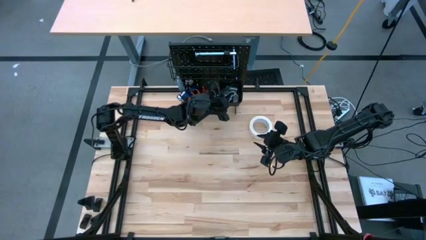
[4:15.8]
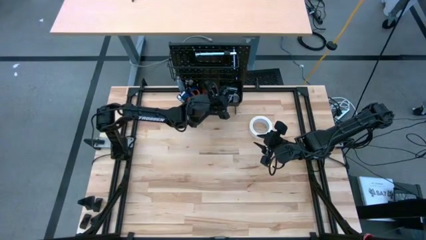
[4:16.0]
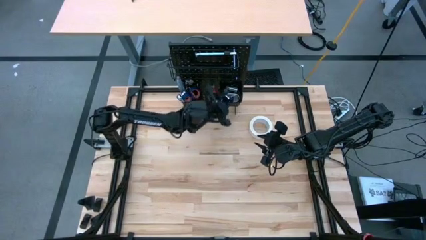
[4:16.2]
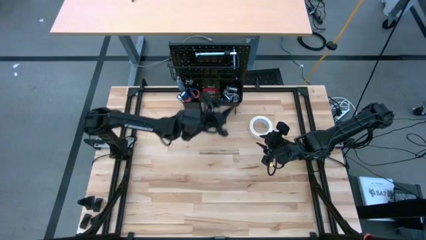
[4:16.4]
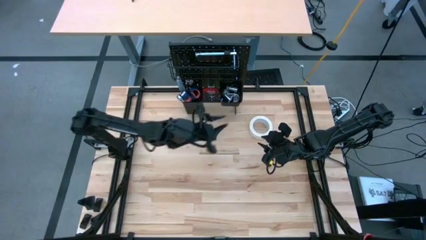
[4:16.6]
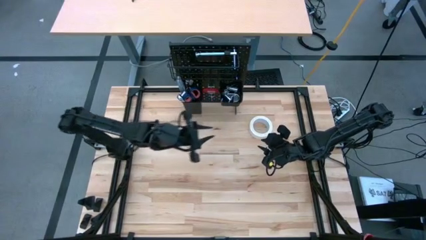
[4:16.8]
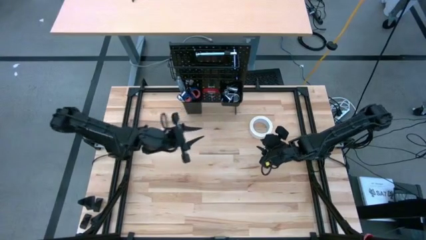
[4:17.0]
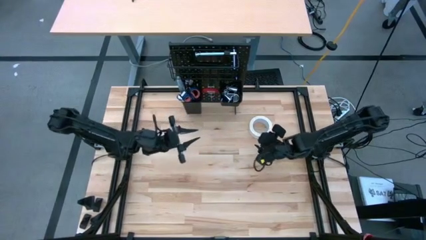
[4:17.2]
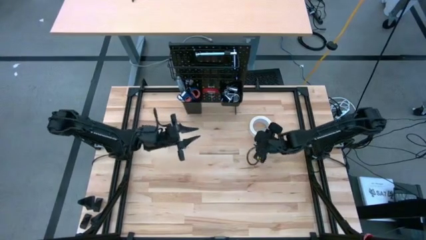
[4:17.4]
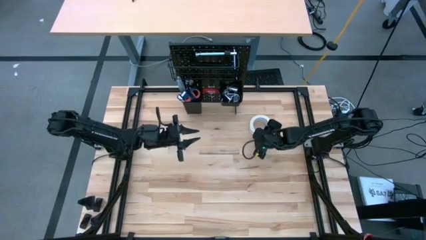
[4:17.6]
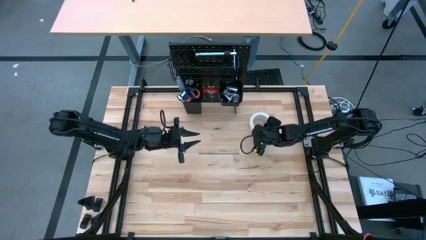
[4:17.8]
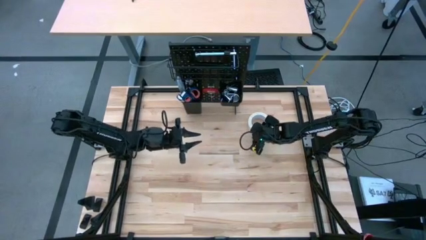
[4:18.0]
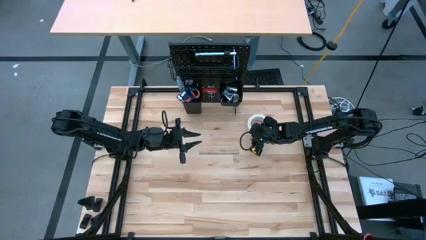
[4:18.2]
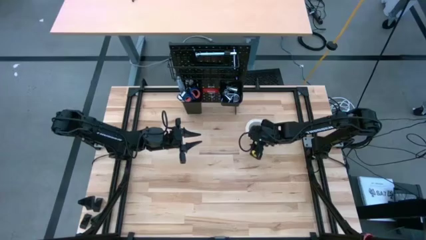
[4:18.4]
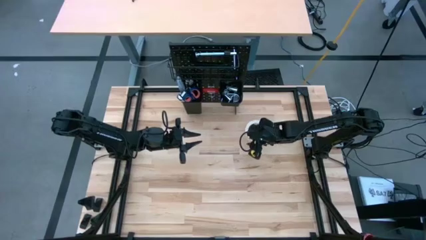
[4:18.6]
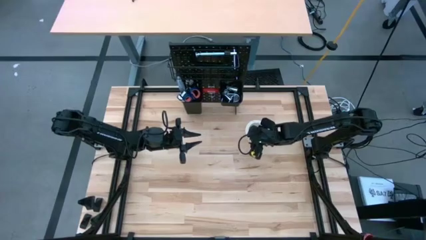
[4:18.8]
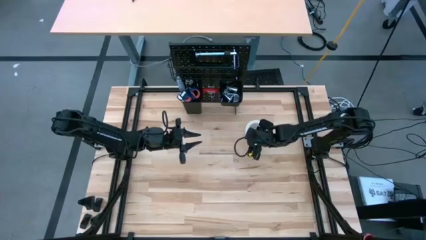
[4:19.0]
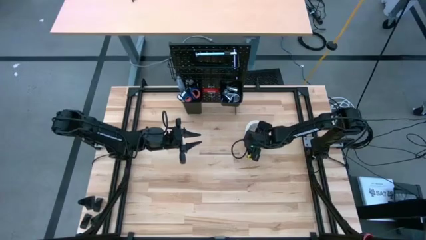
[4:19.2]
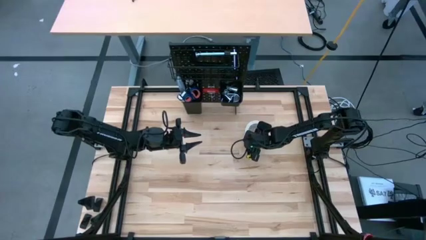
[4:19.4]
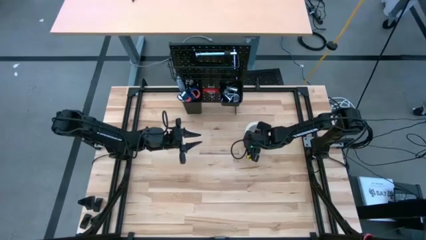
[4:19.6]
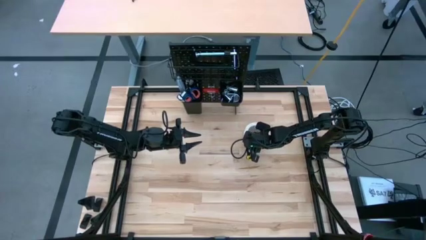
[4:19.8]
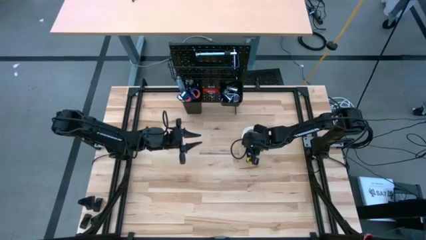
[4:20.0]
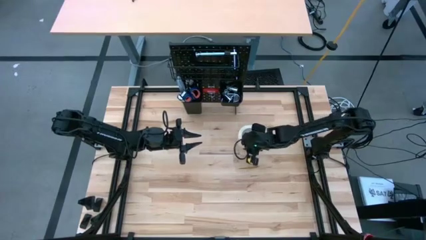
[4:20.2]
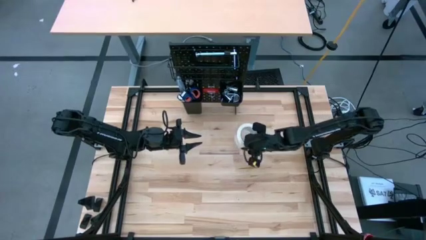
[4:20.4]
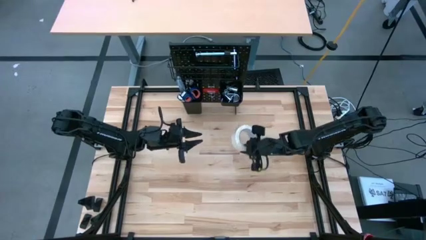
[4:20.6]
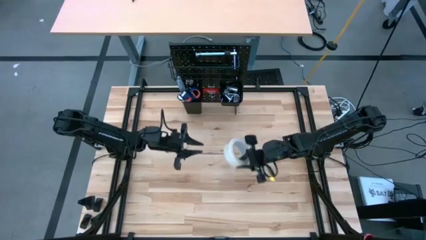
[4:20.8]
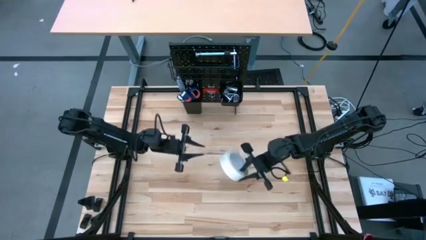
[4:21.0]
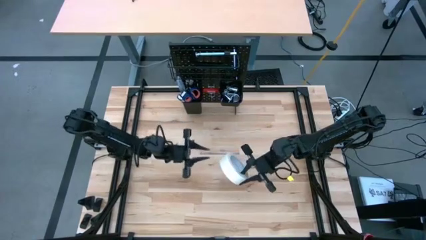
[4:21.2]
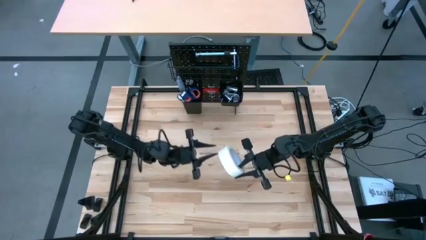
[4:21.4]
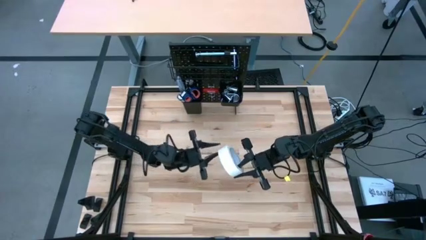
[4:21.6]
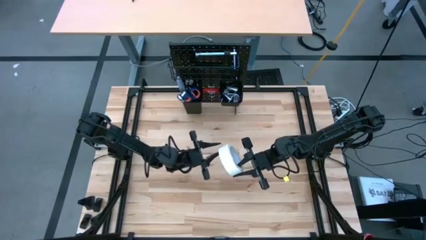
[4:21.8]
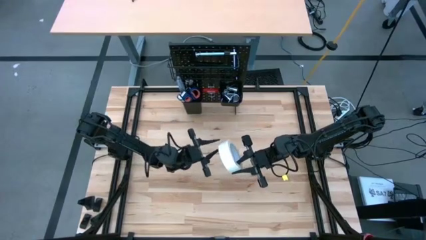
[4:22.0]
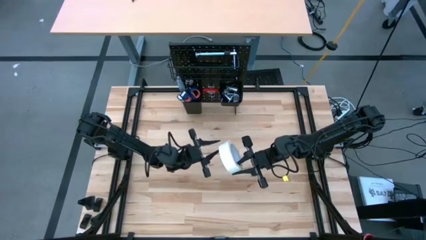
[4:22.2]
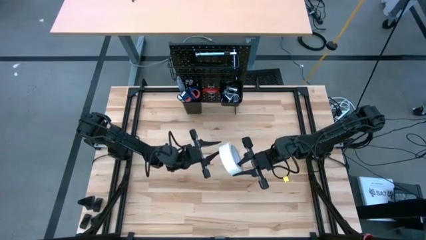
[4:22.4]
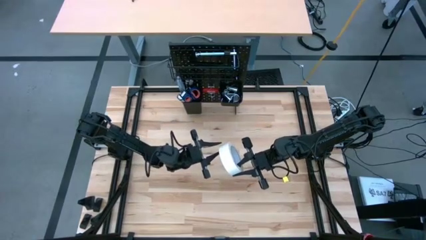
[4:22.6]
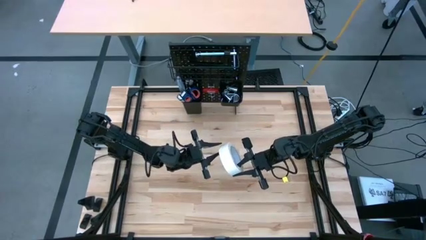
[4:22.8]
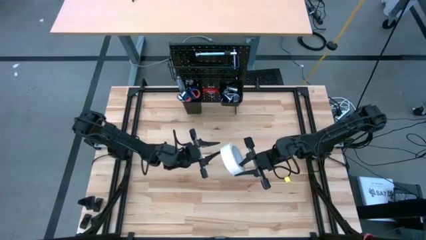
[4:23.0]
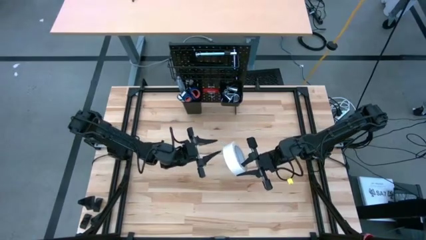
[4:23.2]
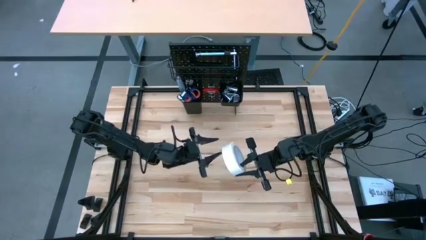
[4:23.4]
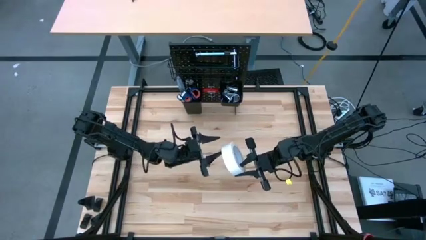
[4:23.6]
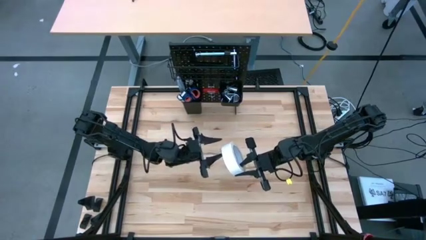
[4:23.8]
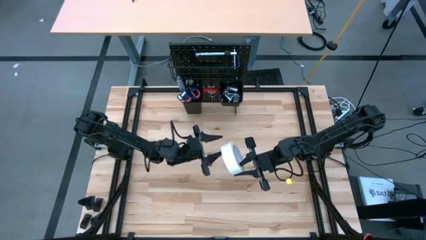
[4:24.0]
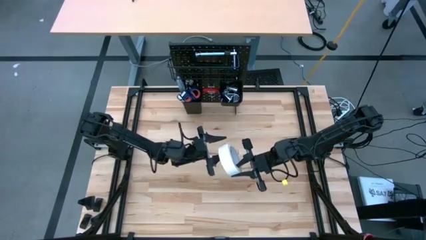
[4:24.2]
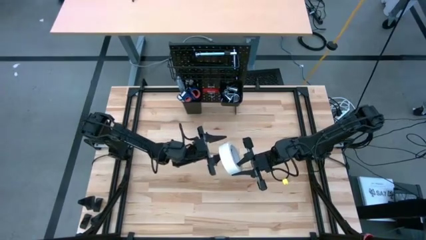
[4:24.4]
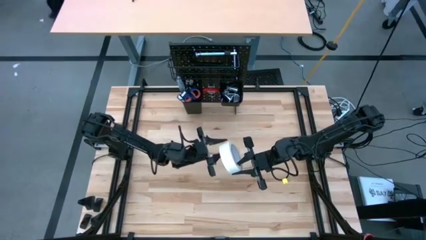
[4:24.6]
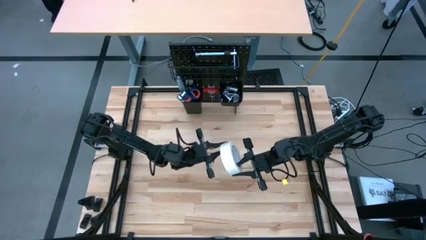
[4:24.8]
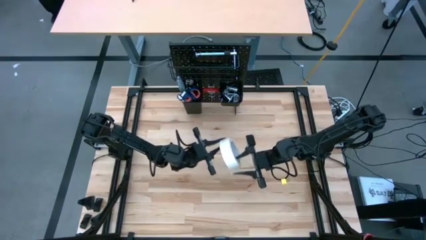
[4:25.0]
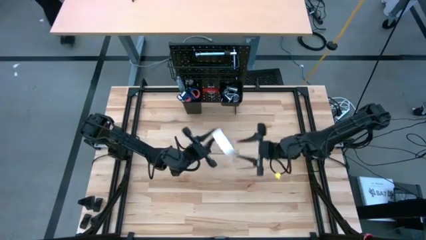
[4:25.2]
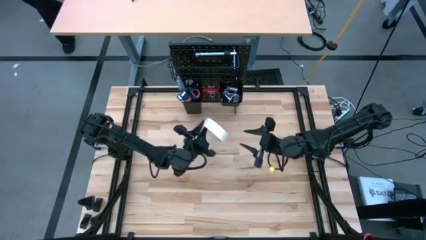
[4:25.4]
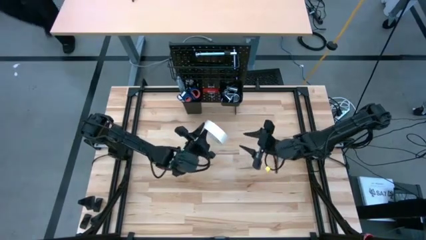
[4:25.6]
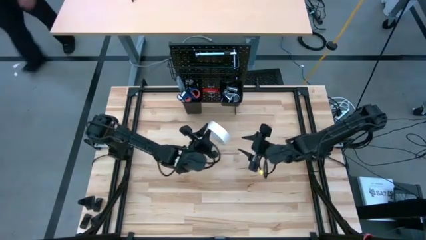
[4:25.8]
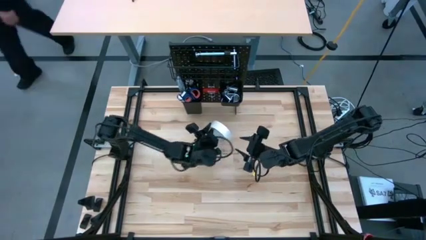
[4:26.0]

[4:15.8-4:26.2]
Task: Hang tools onto peg board
Hang the white masking tape on the peg board
